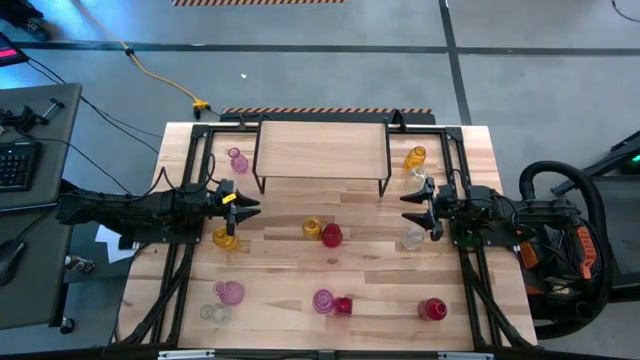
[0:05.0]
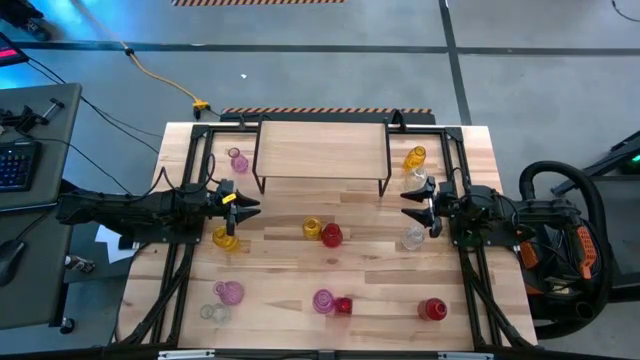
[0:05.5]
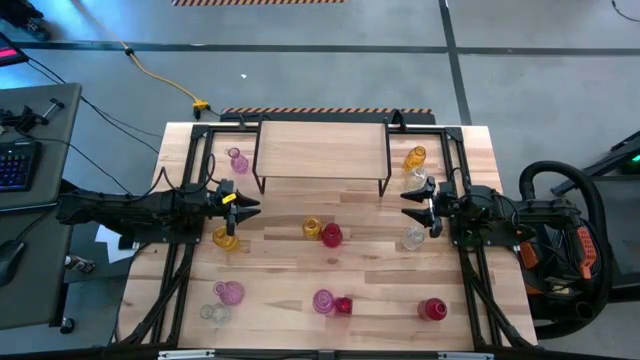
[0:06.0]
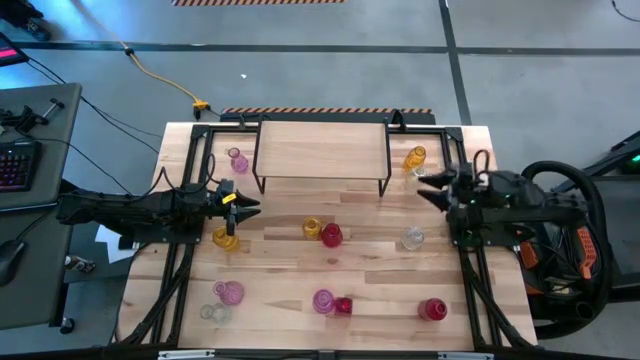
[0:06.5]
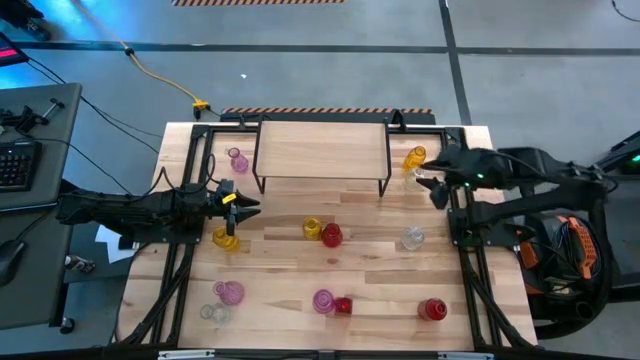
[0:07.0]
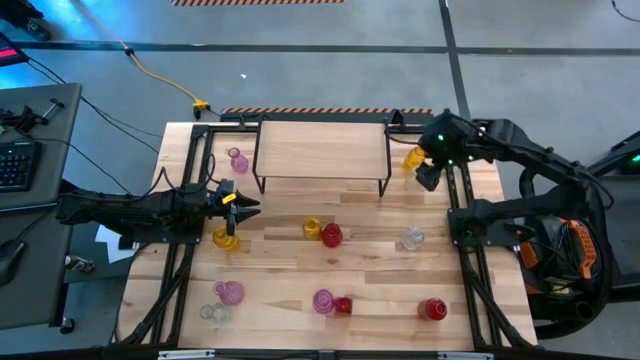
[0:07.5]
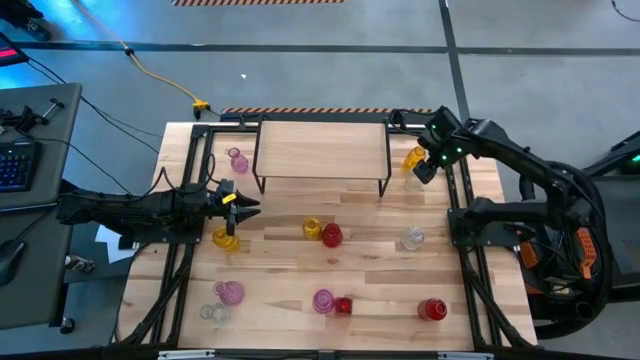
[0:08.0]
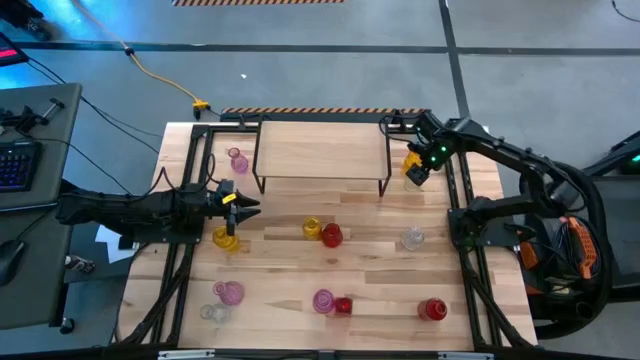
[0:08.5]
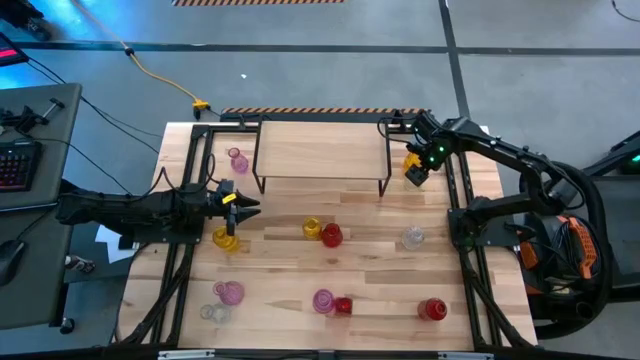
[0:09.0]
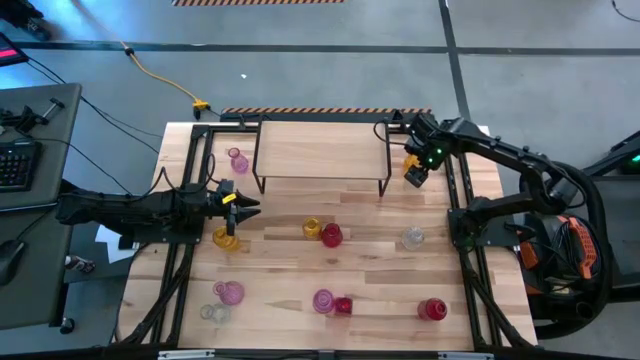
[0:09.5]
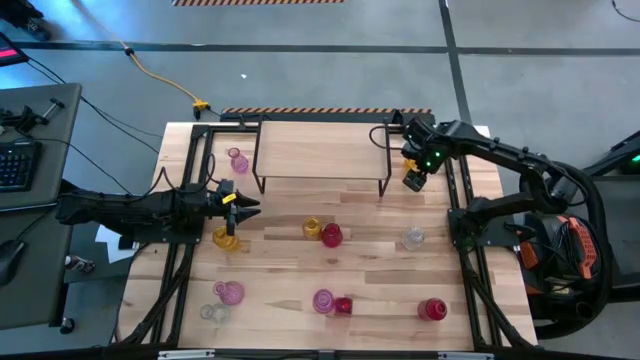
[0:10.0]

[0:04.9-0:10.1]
Task: sort vases onto shelf
Put the top right transparent vase on the shelf

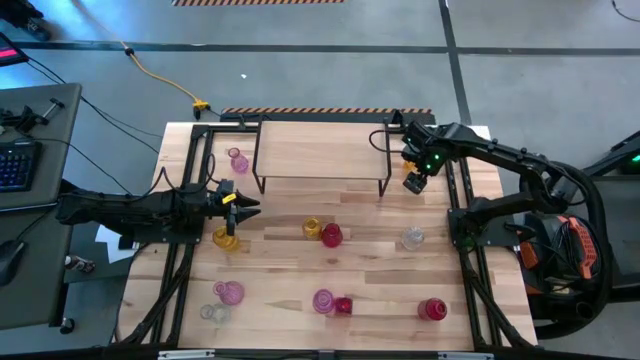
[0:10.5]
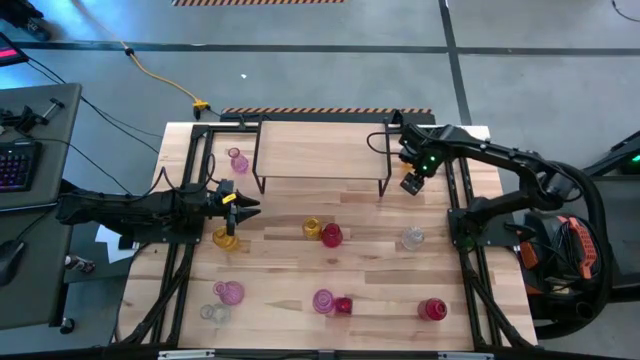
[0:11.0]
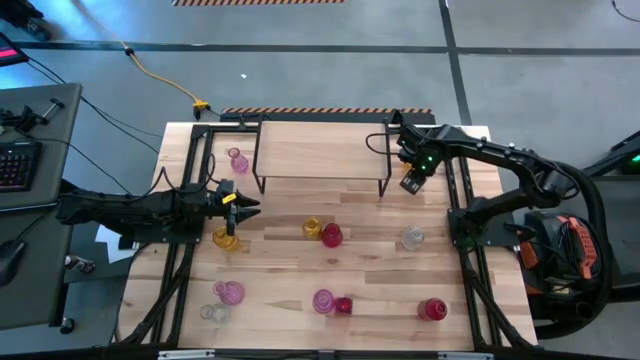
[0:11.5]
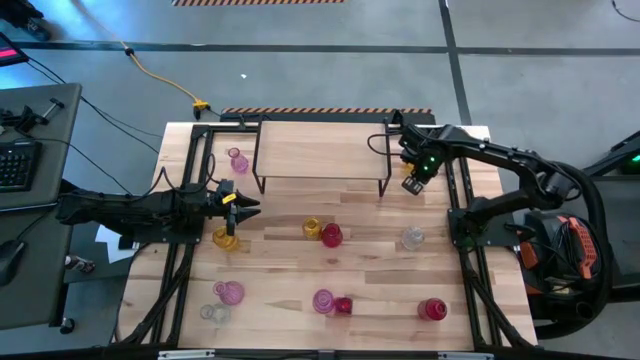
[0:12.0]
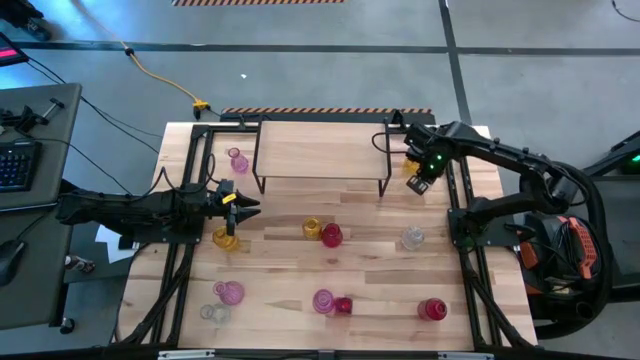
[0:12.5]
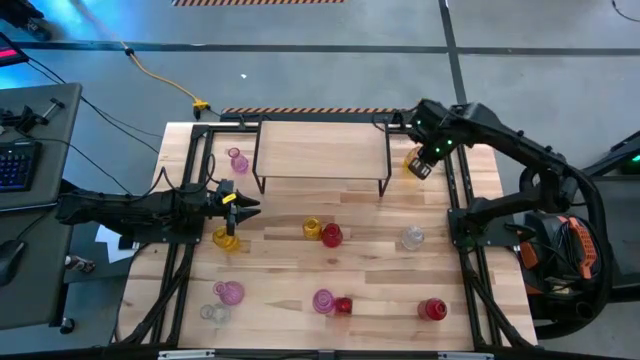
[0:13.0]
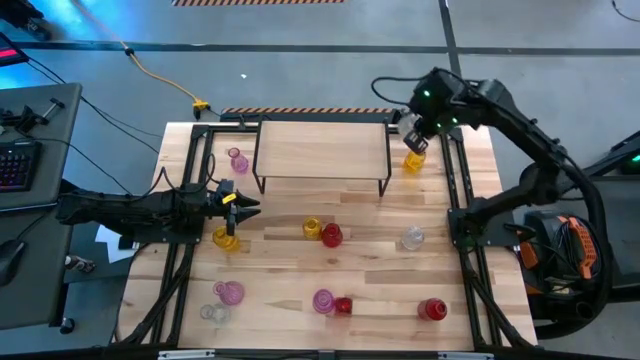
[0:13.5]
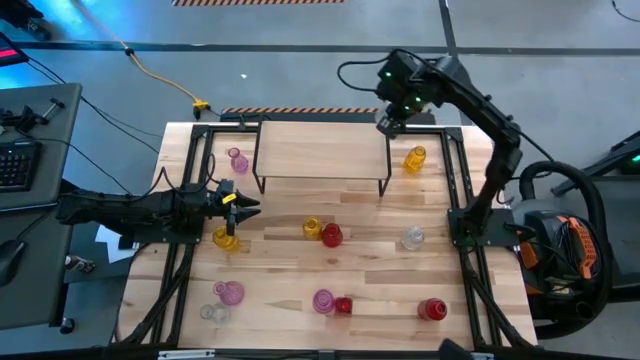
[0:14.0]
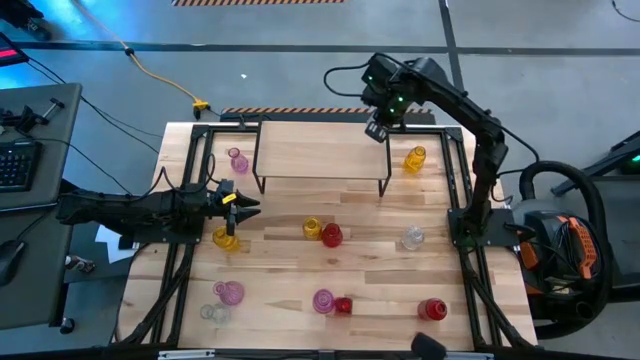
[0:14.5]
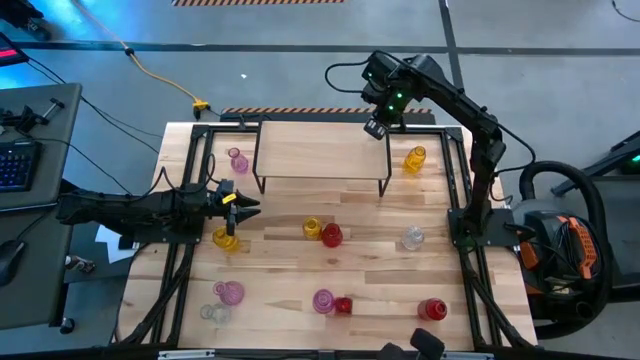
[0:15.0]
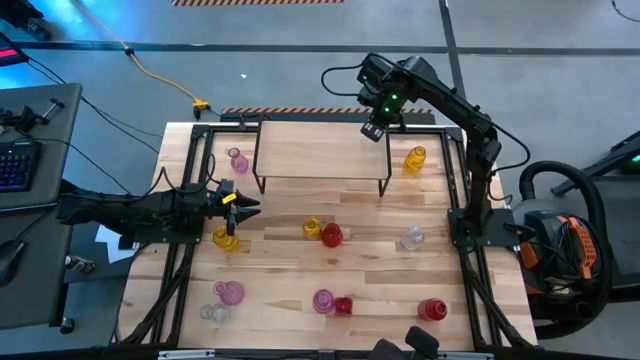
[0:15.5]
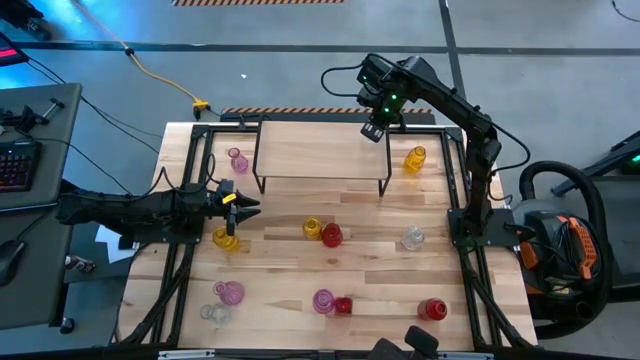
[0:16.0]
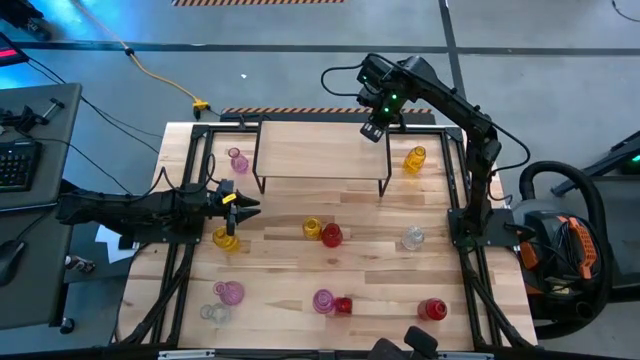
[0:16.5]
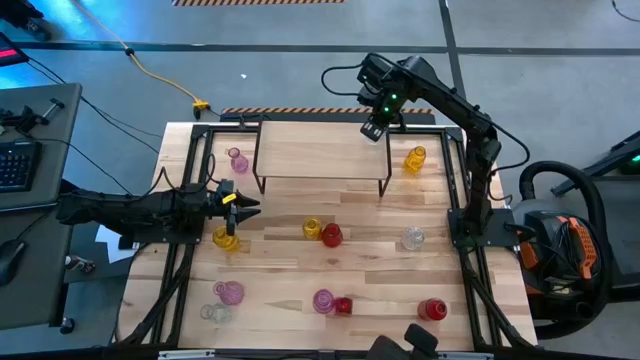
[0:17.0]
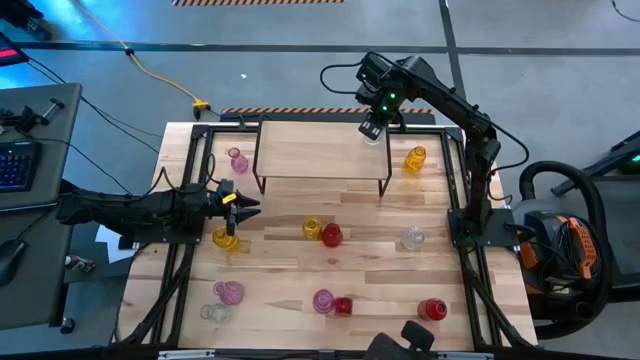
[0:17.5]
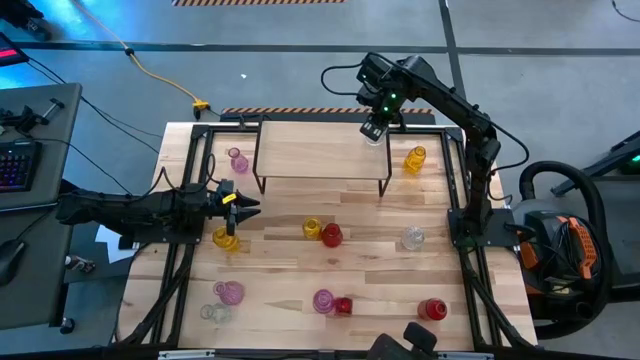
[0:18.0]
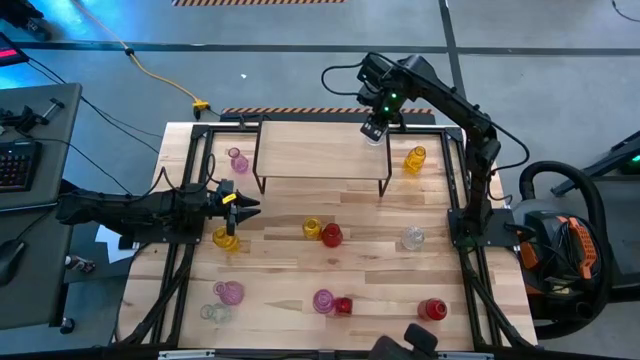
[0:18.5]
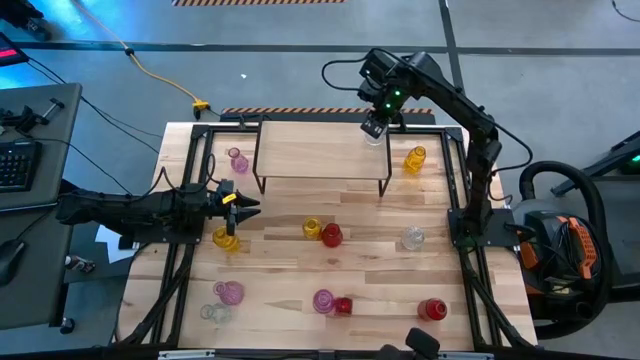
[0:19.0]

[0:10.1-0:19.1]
Put the top right transparent vase on the shelf

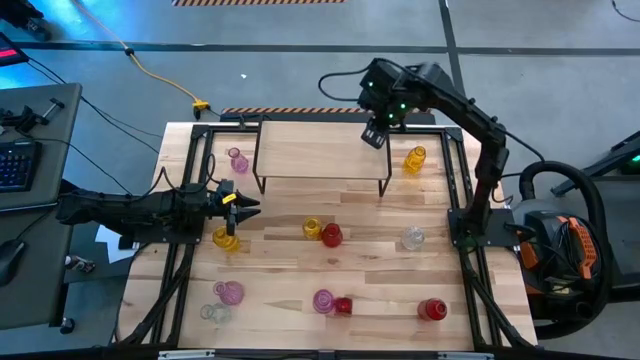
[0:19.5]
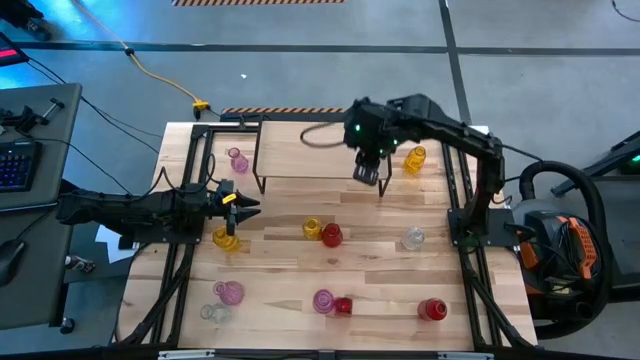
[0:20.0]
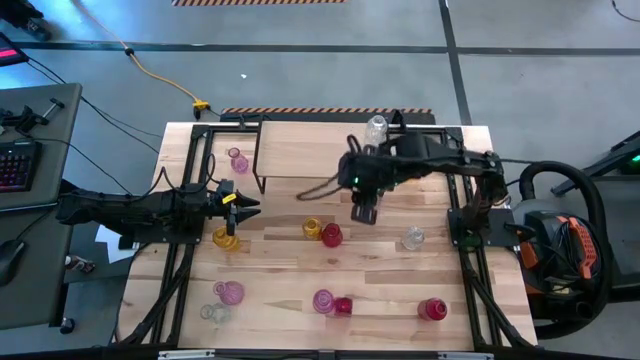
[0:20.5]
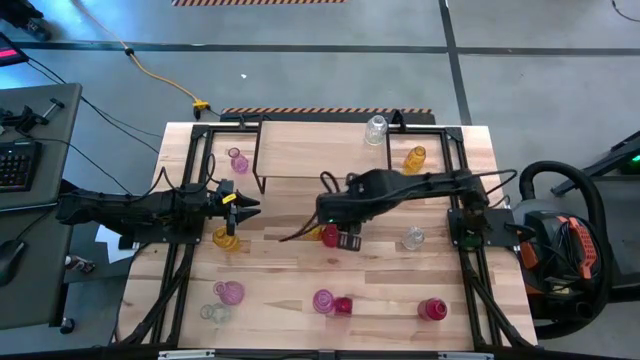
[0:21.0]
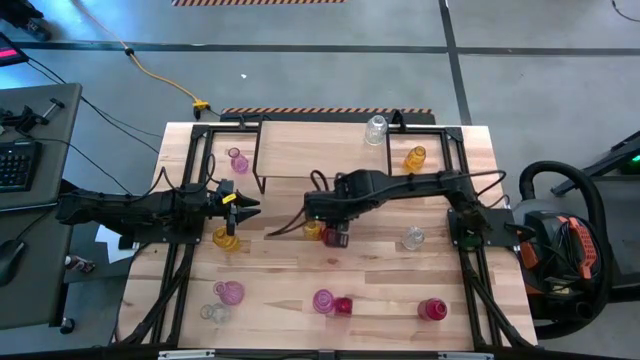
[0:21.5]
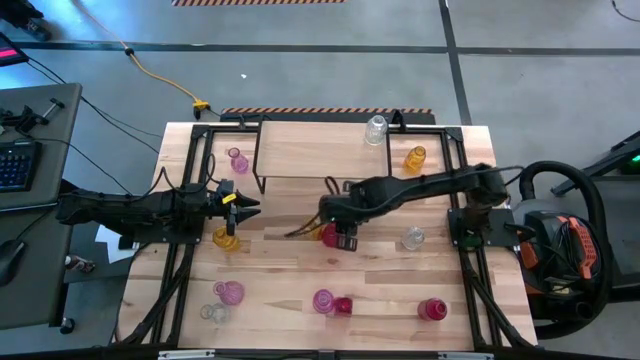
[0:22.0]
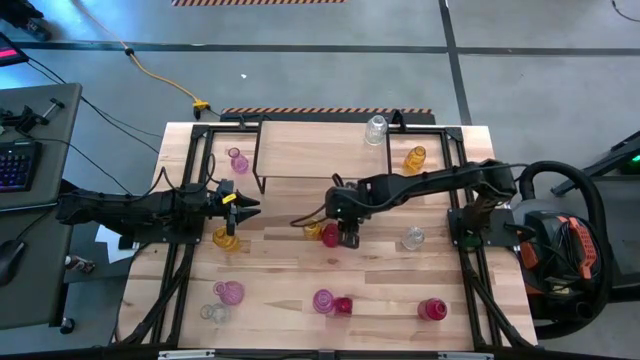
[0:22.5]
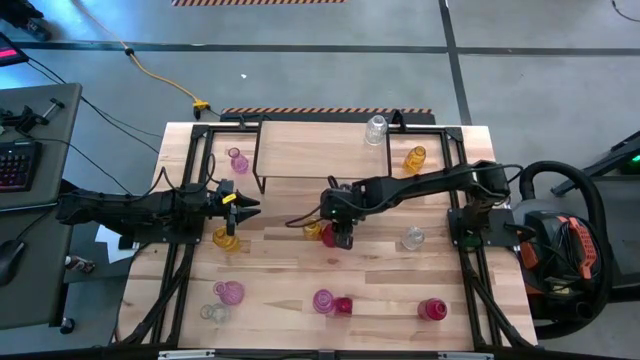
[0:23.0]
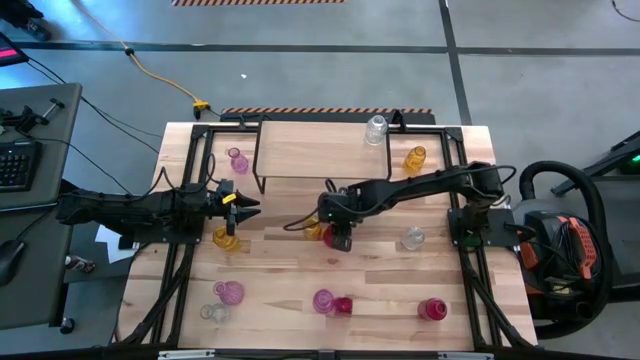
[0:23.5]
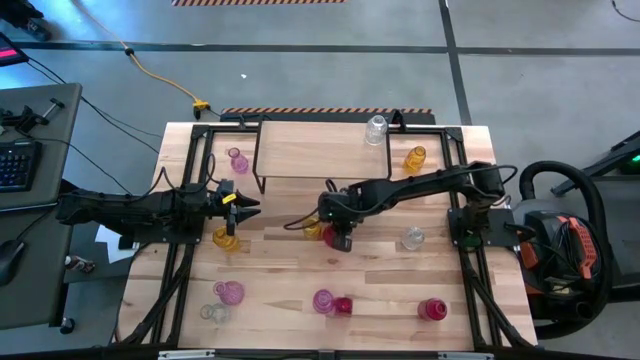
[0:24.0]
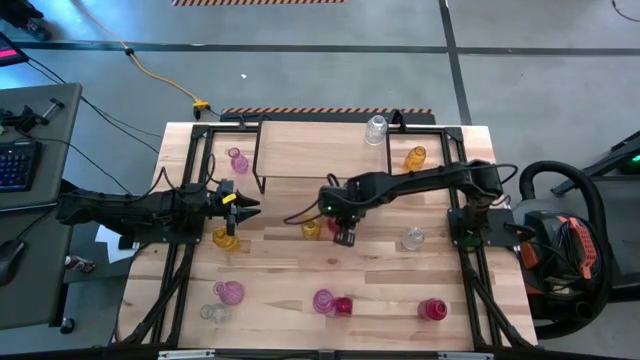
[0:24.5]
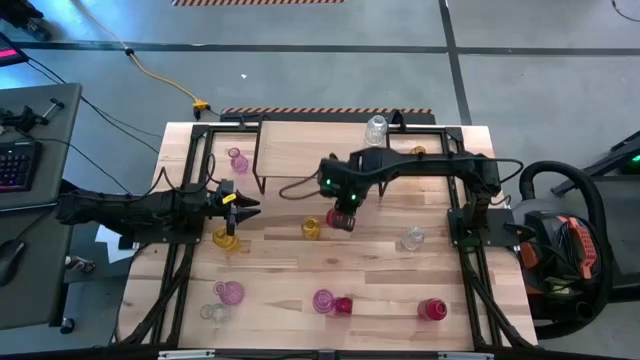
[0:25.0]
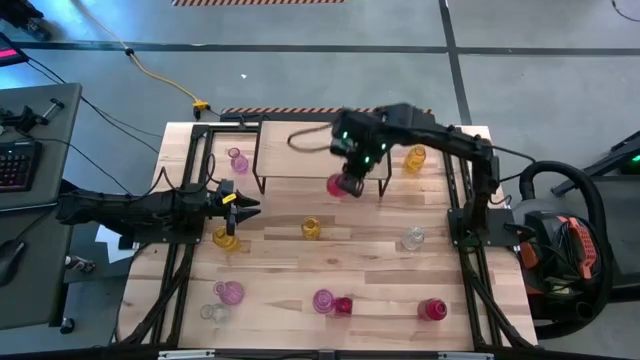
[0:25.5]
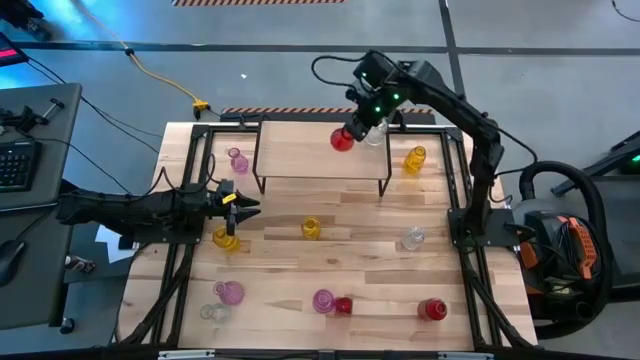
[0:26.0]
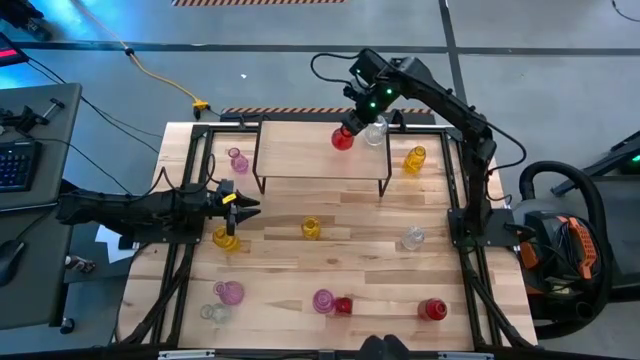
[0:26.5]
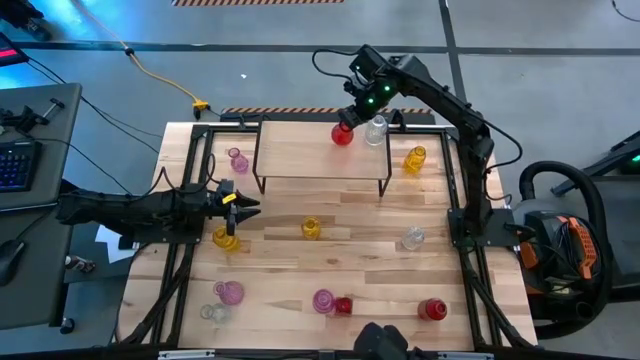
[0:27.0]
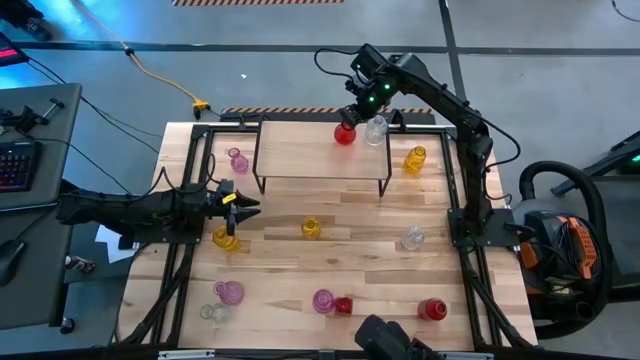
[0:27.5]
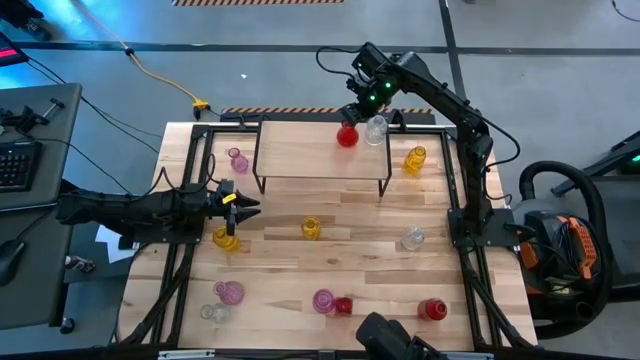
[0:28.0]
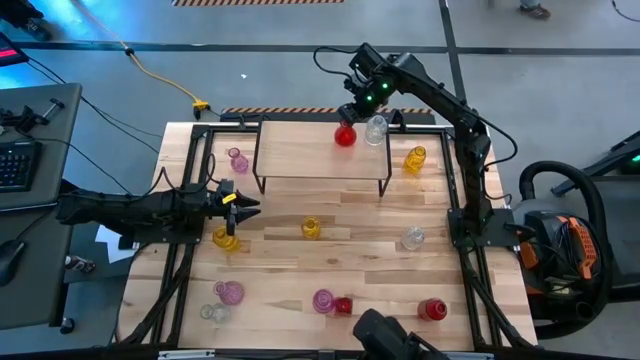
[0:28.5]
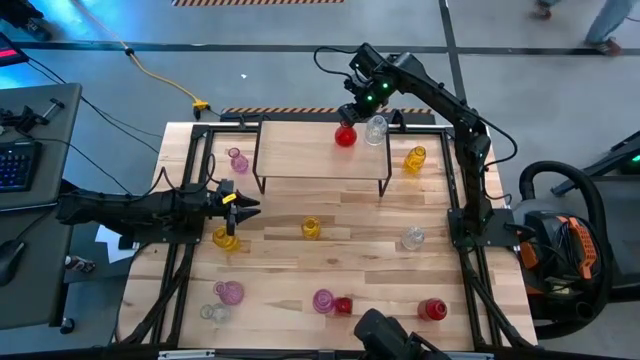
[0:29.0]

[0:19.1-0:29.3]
Put the top red vase on the shelf
